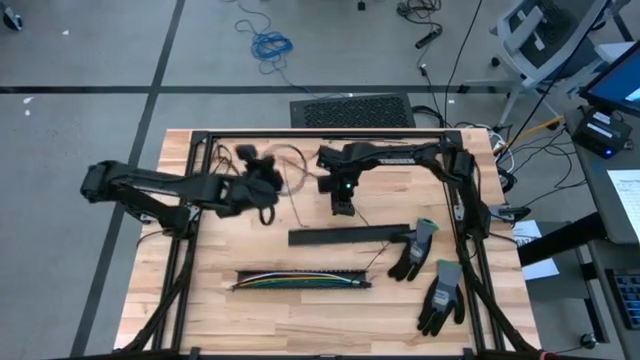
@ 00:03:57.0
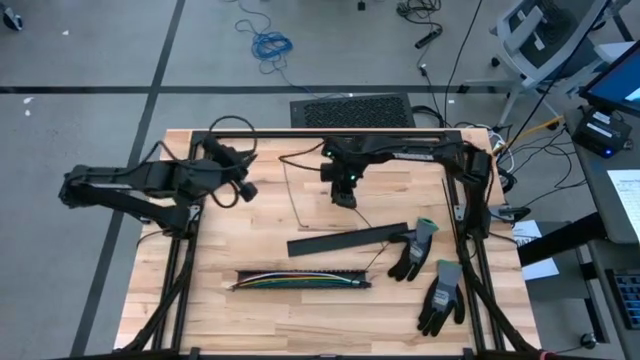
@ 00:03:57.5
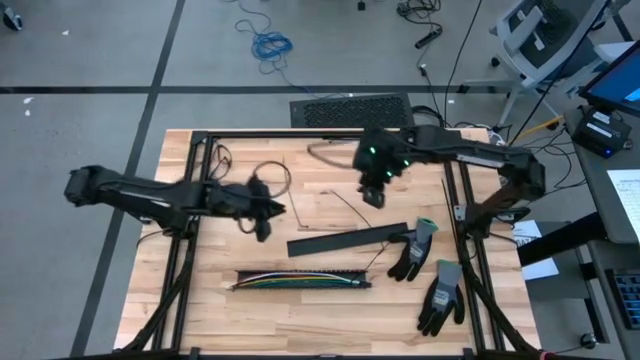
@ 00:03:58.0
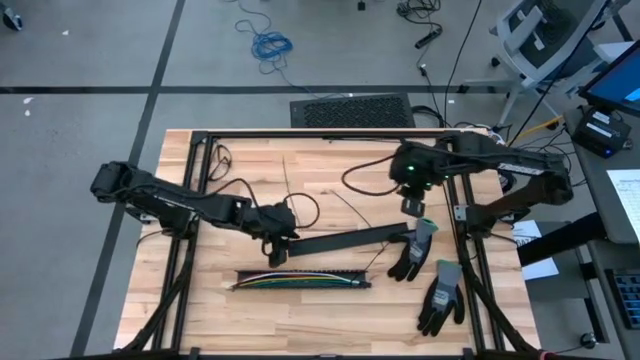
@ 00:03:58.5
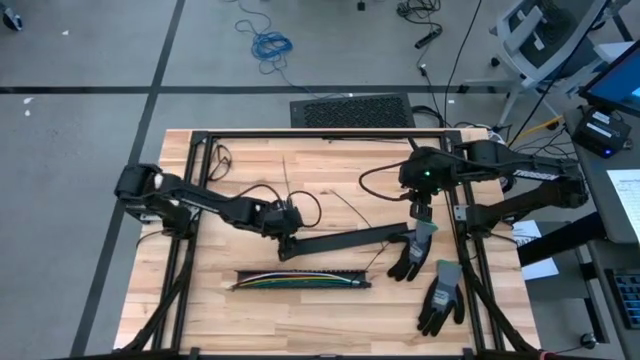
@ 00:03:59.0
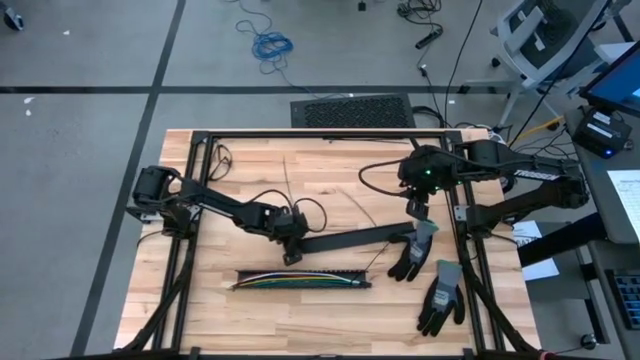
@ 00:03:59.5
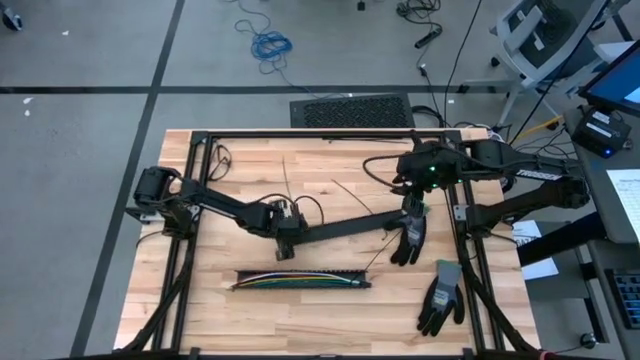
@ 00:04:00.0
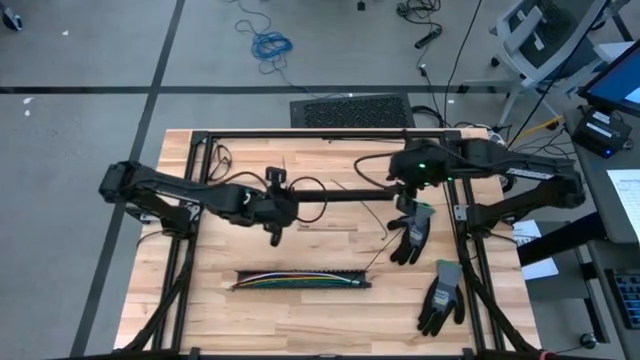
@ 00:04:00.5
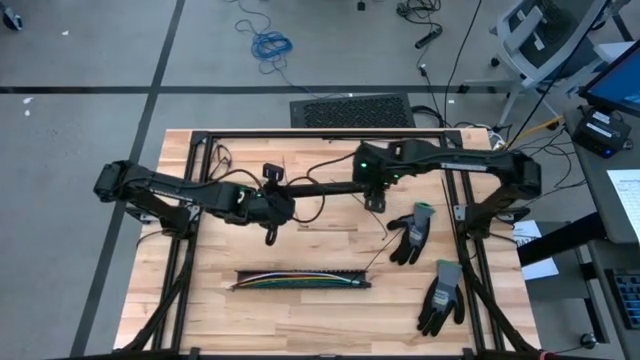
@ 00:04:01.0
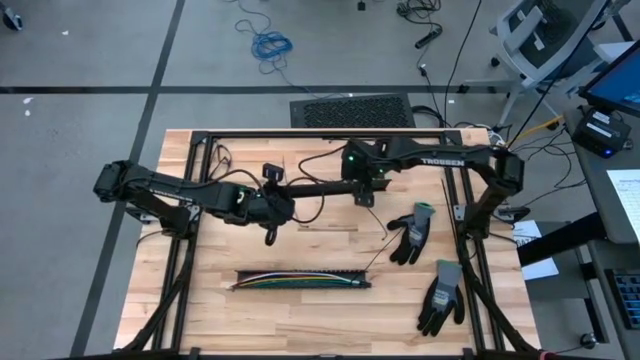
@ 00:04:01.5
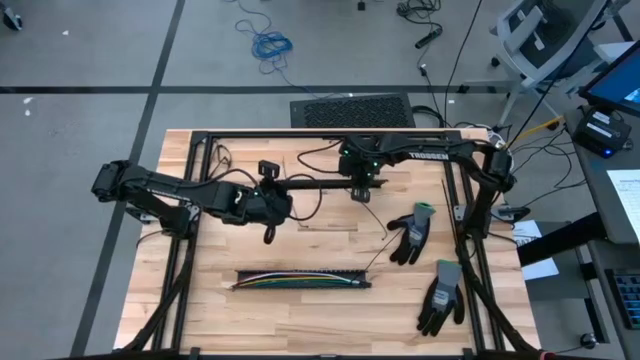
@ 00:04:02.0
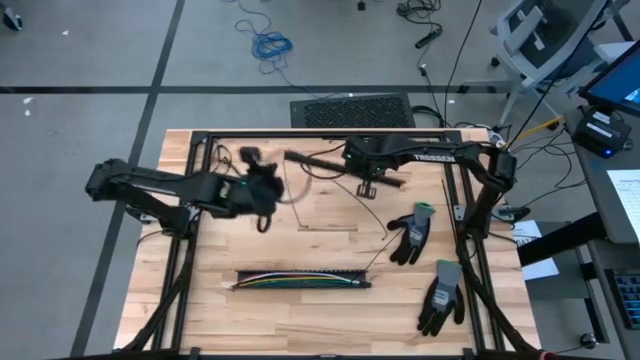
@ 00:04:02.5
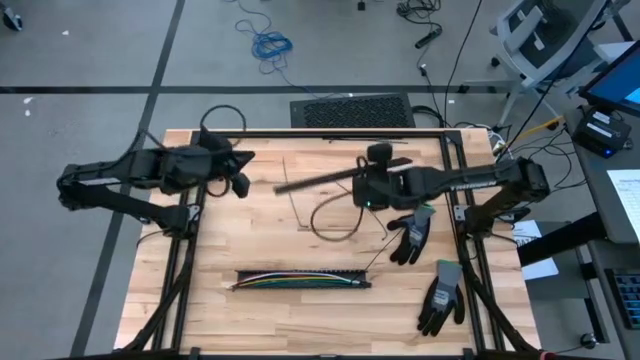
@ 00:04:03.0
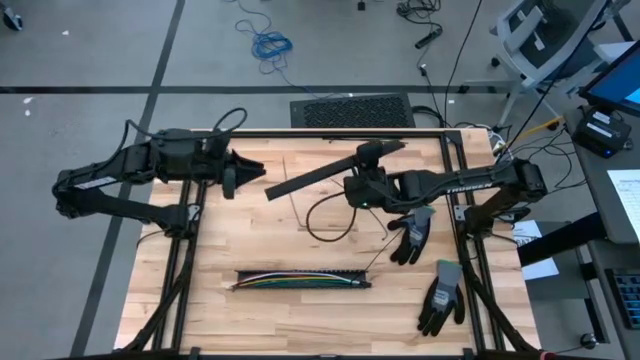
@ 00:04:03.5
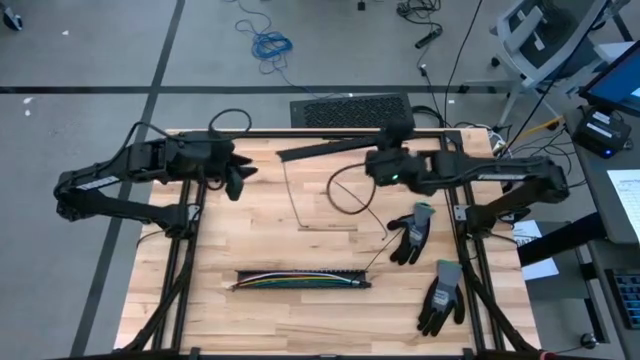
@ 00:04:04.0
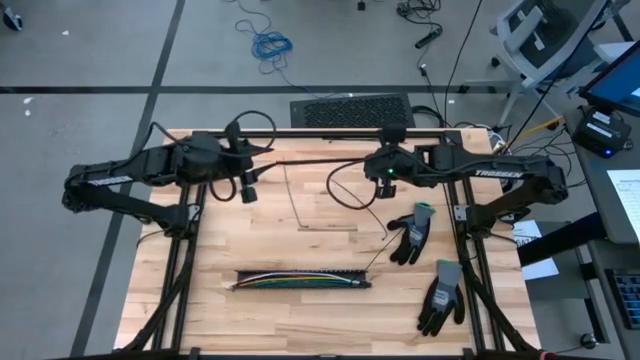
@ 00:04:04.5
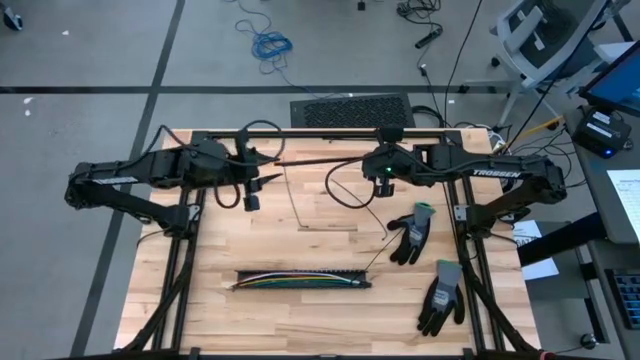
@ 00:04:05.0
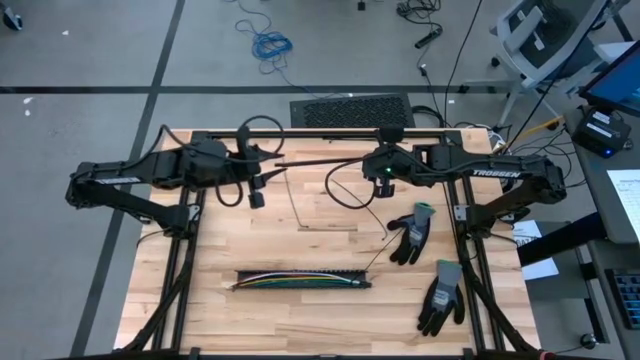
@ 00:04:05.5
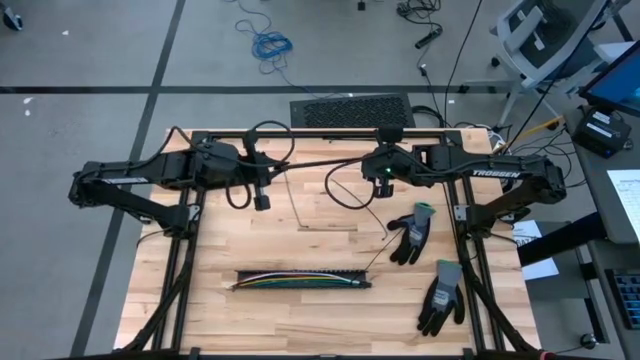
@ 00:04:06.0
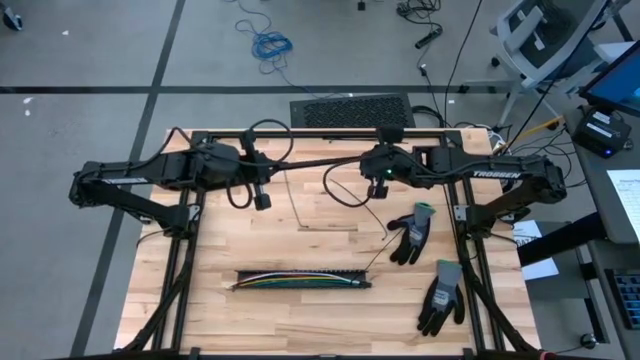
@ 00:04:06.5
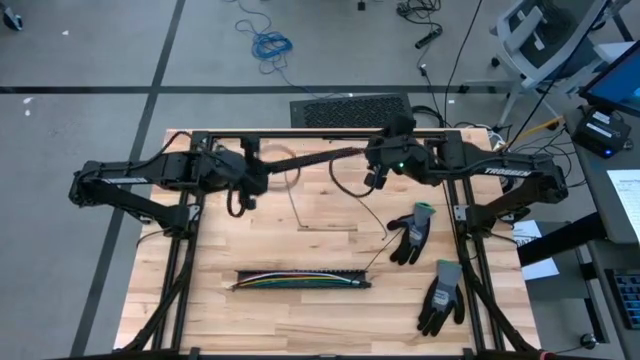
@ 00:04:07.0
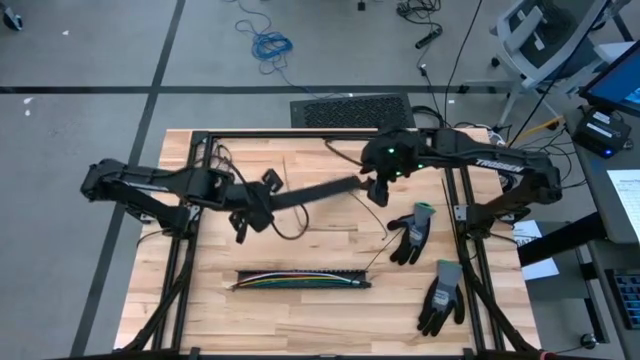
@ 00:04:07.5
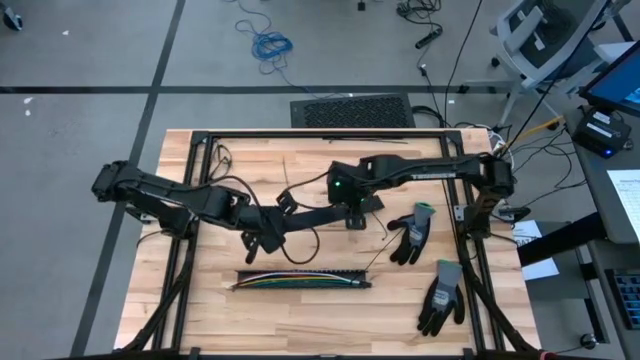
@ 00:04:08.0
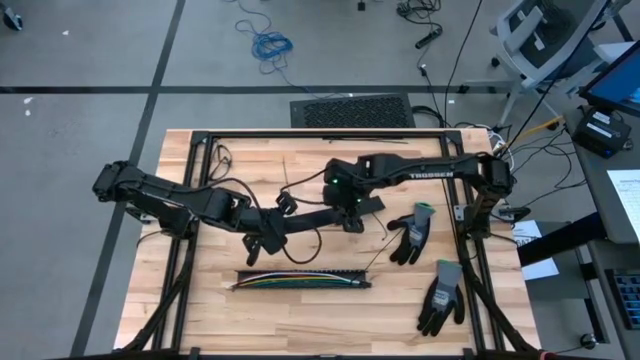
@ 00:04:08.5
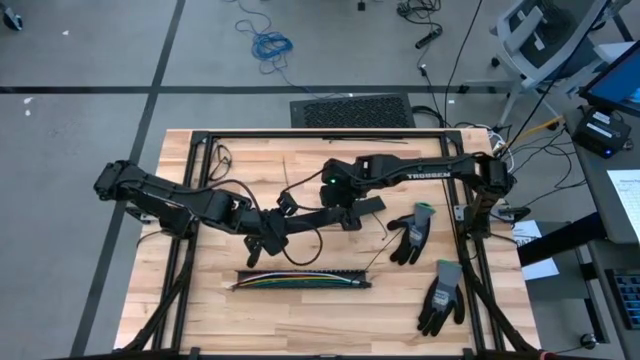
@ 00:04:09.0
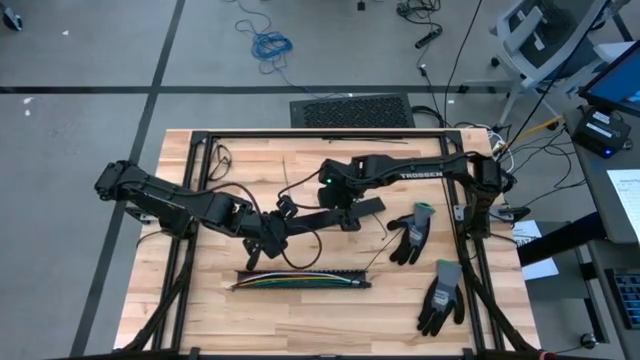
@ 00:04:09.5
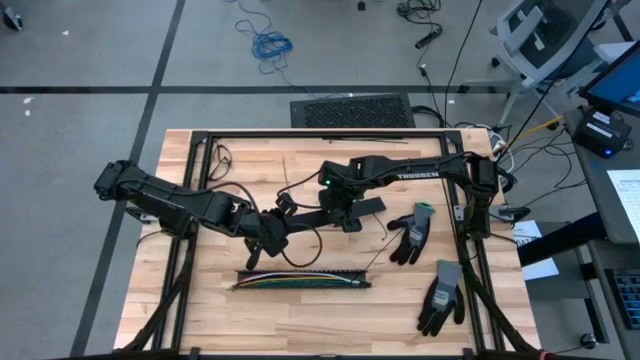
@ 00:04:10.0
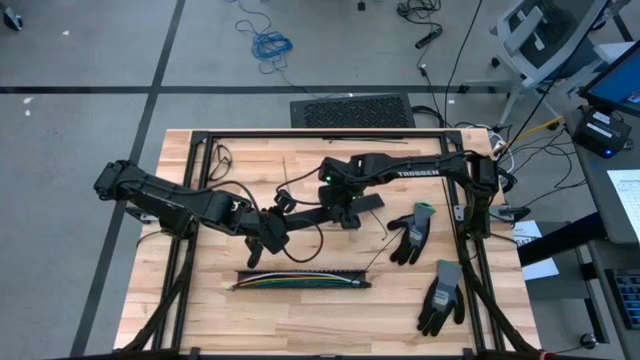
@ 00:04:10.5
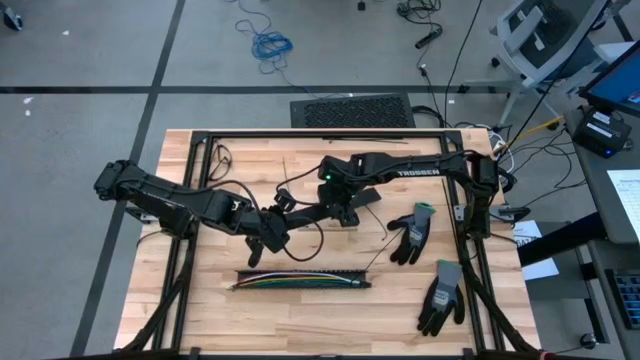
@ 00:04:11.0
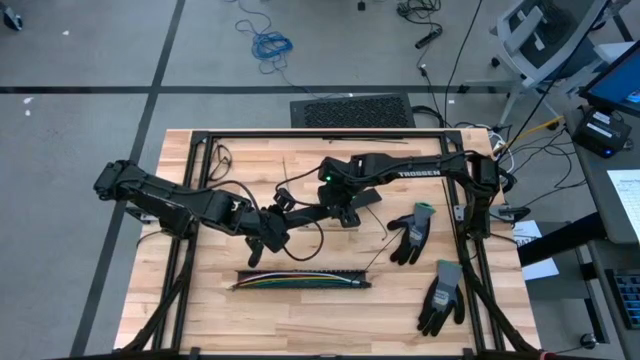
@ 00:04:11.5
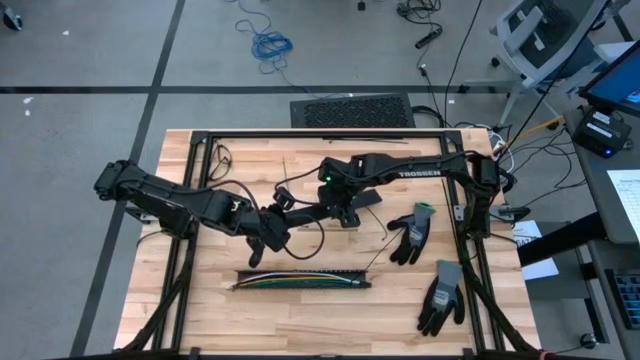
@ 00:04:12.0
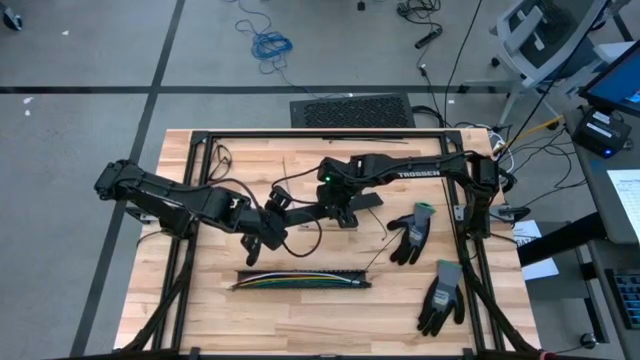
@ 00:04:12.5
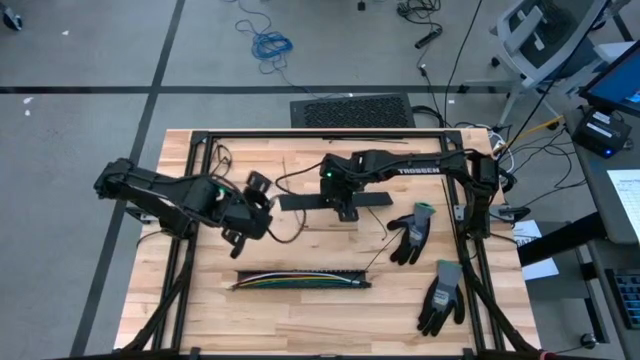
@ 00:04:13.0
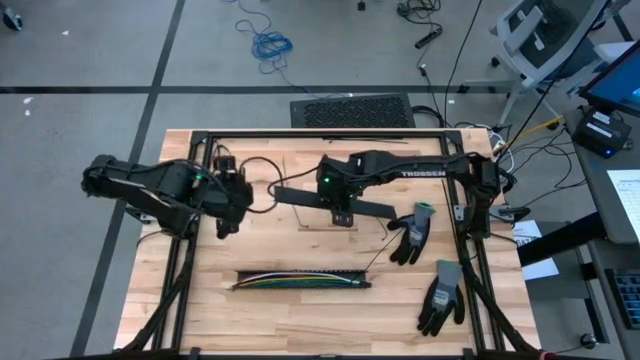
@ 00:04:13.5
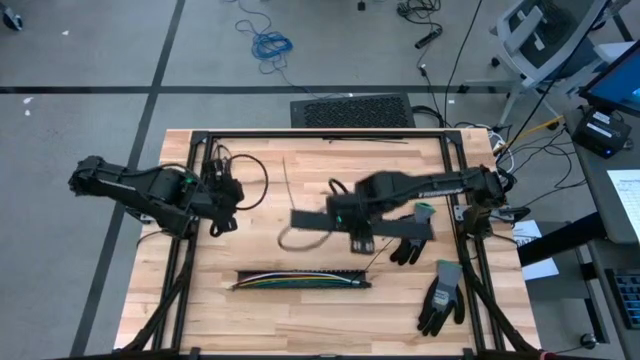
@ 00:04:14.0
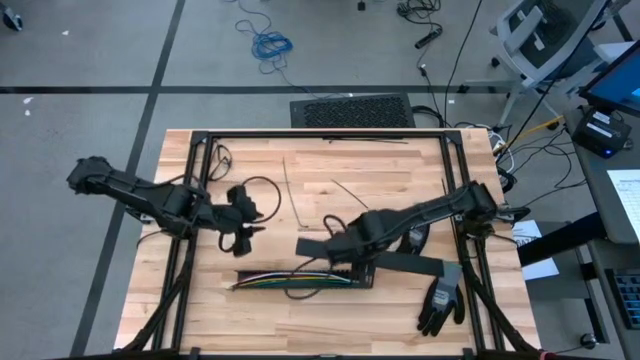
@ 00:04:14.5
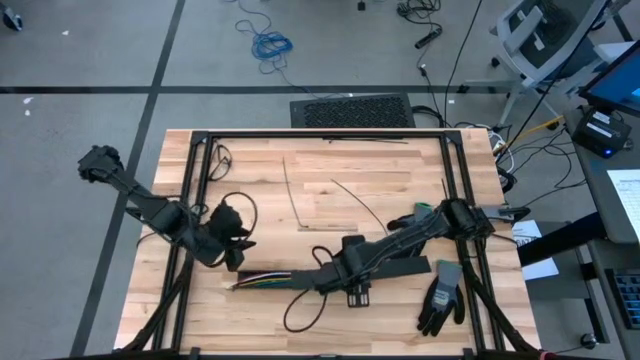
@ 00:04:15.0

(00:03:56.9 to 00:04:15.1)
Task: Ziptie cables
Close the black cable duct
